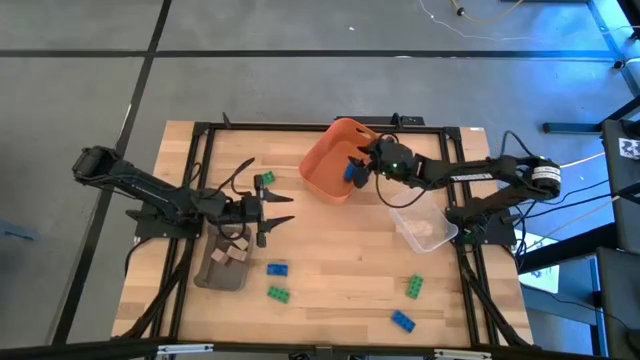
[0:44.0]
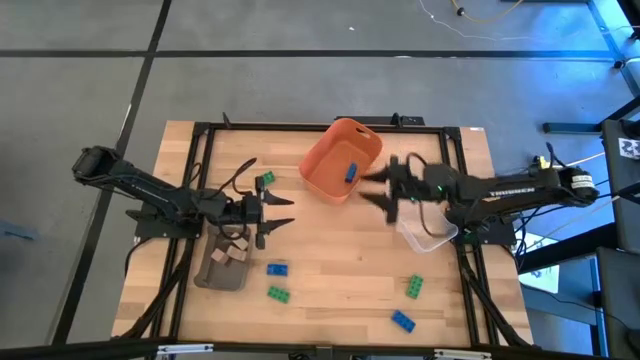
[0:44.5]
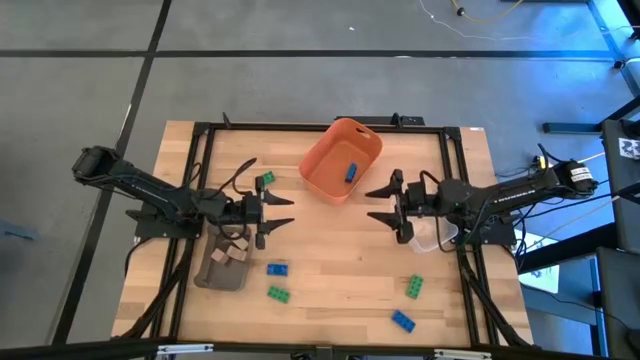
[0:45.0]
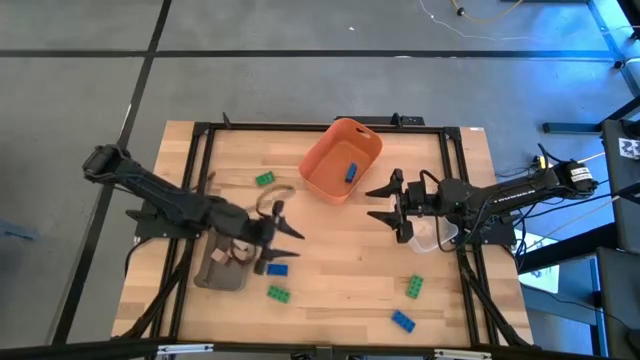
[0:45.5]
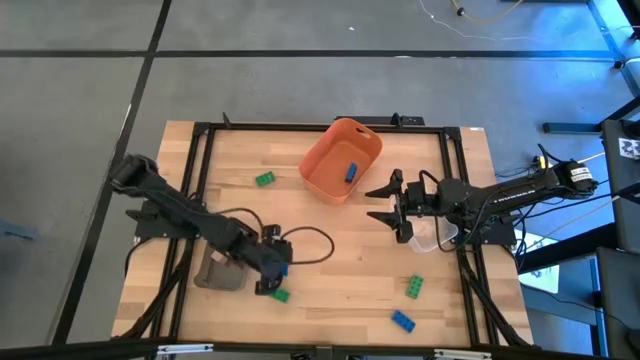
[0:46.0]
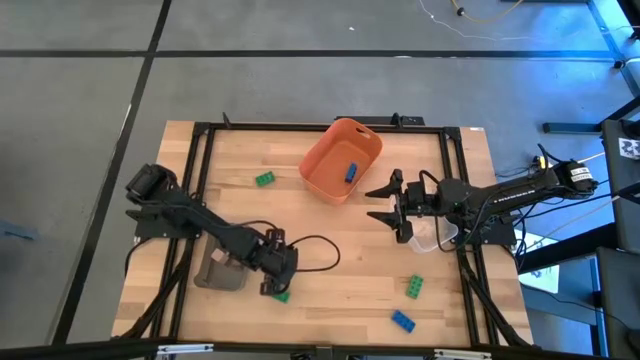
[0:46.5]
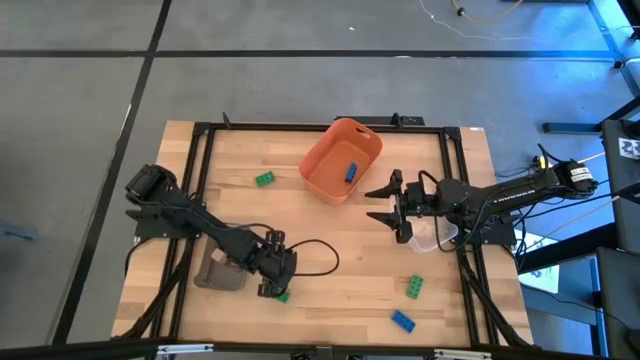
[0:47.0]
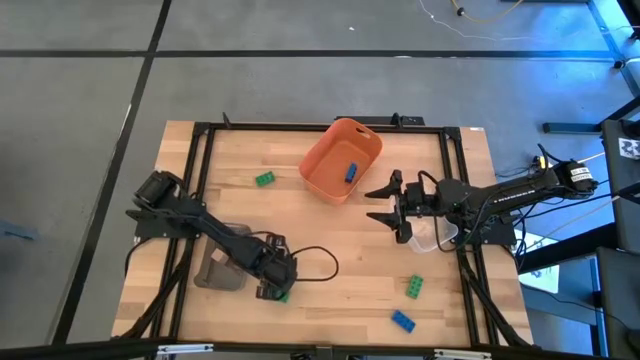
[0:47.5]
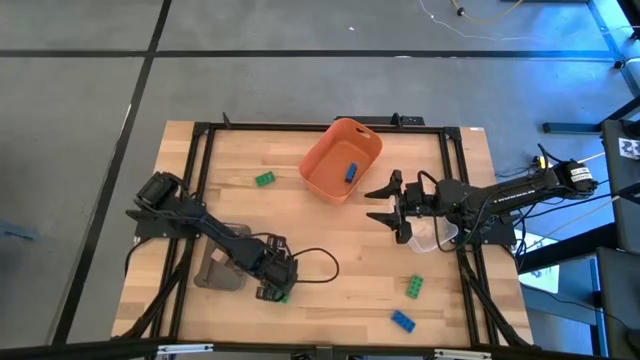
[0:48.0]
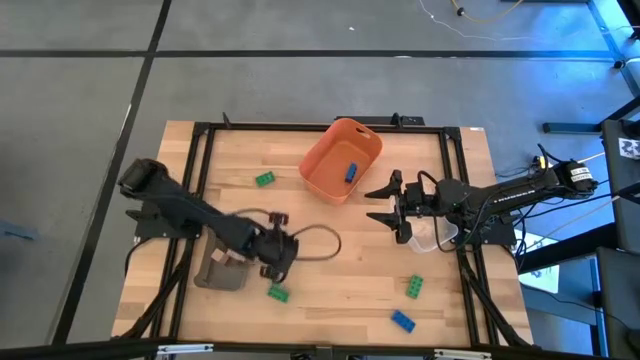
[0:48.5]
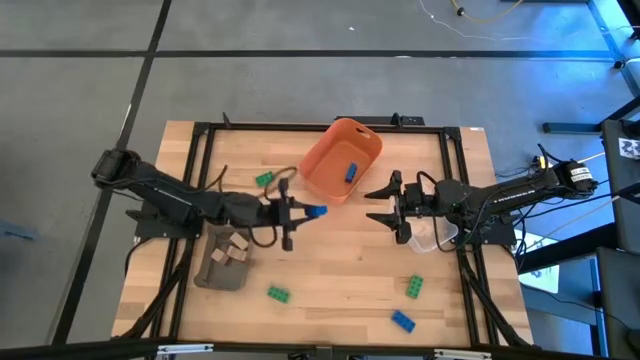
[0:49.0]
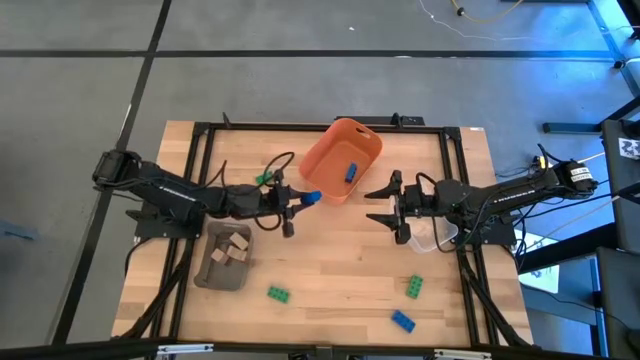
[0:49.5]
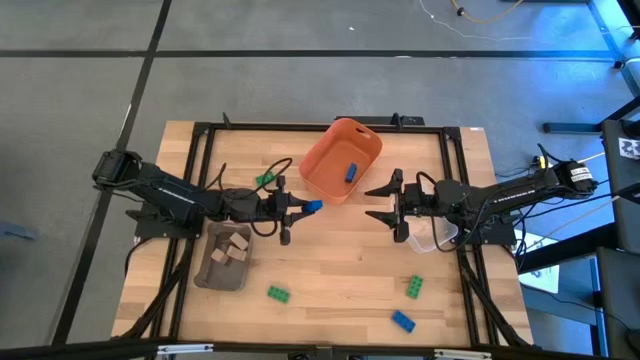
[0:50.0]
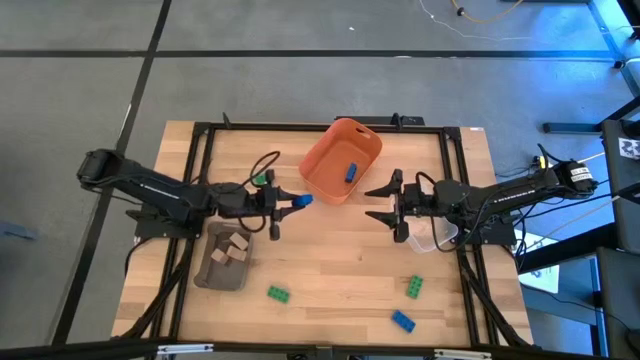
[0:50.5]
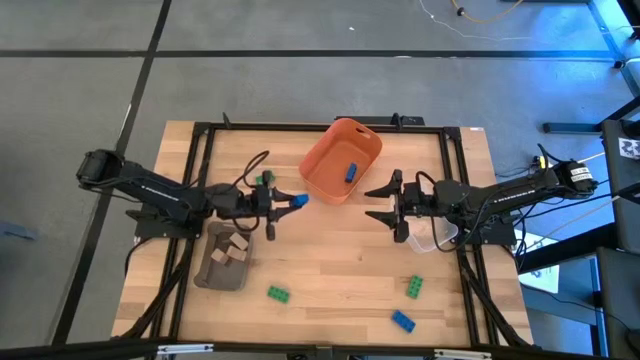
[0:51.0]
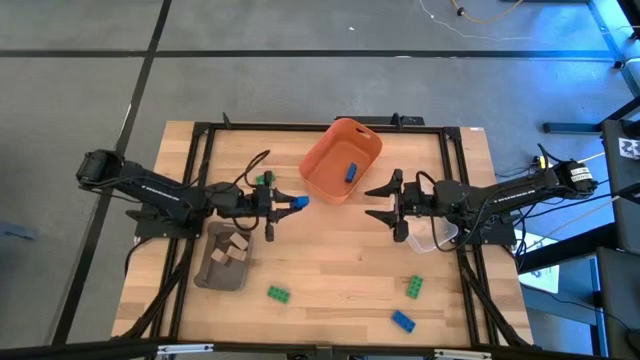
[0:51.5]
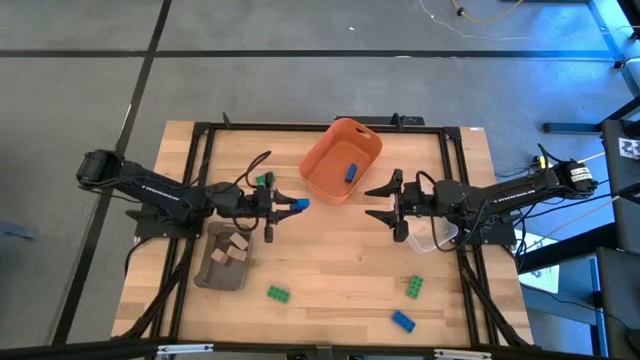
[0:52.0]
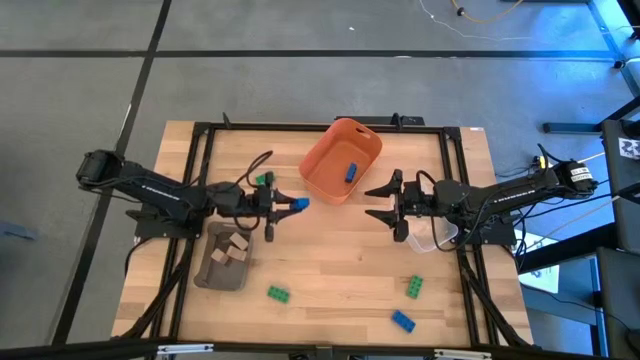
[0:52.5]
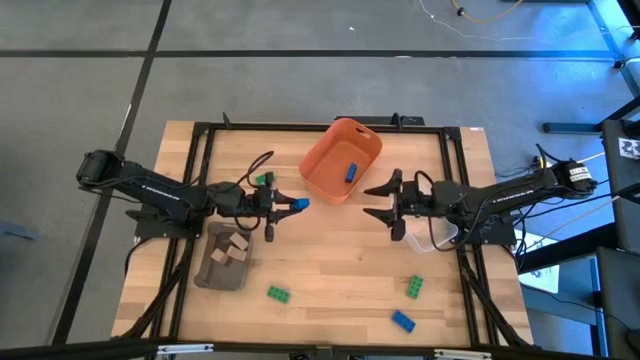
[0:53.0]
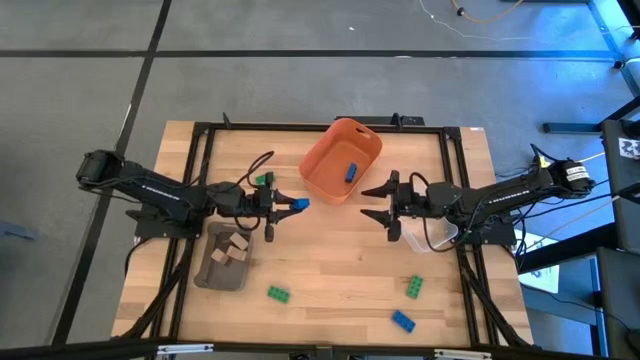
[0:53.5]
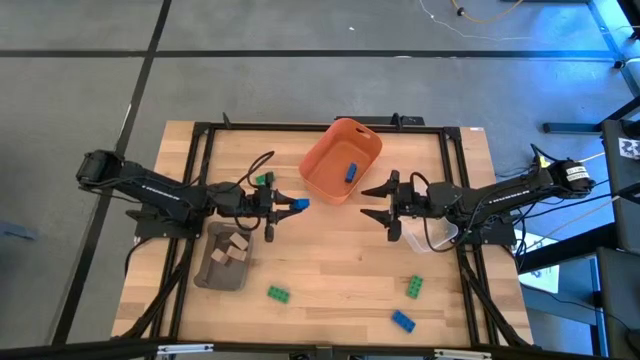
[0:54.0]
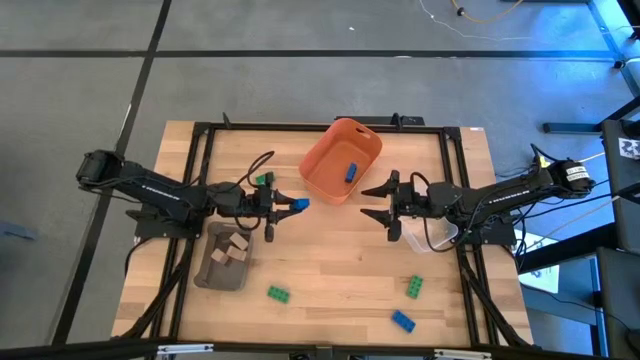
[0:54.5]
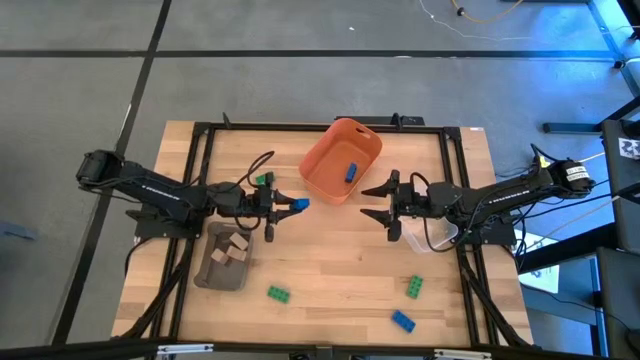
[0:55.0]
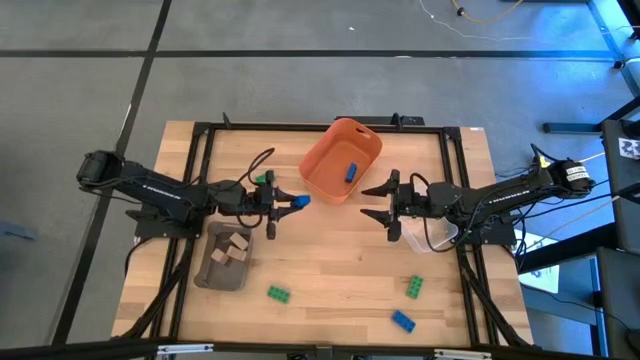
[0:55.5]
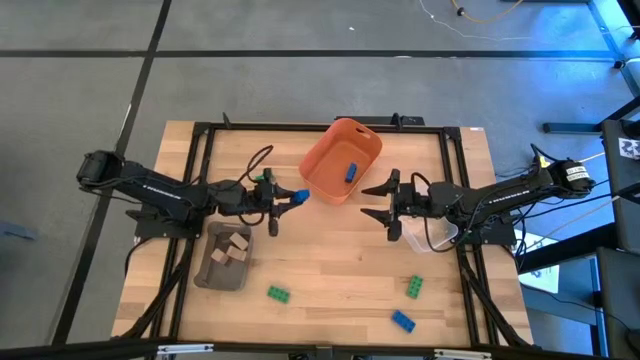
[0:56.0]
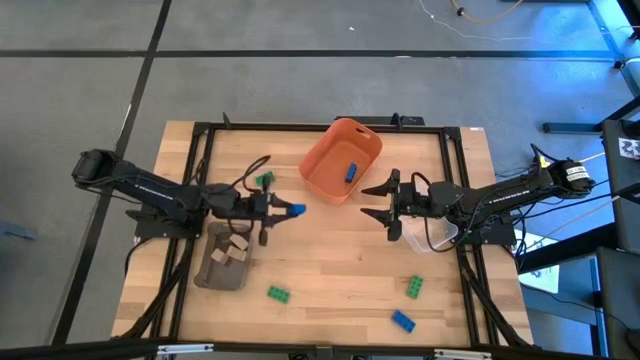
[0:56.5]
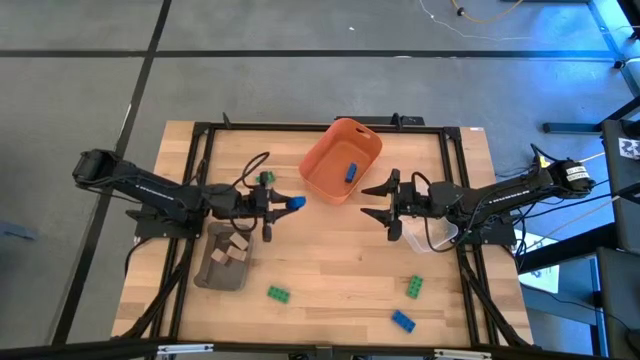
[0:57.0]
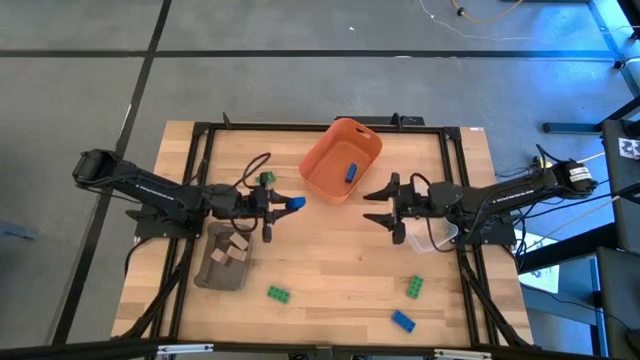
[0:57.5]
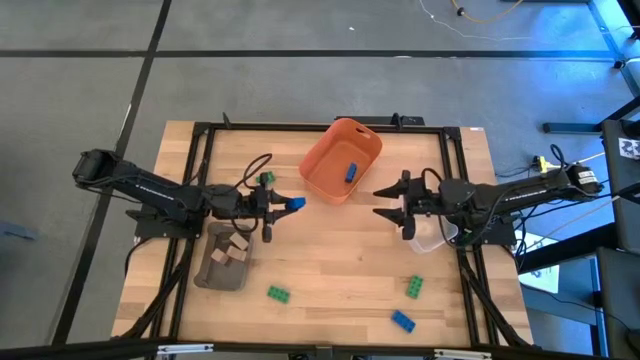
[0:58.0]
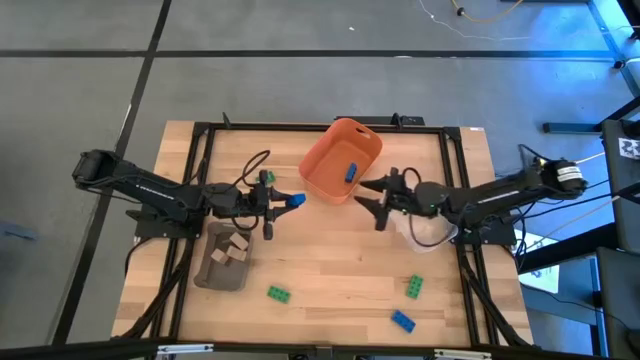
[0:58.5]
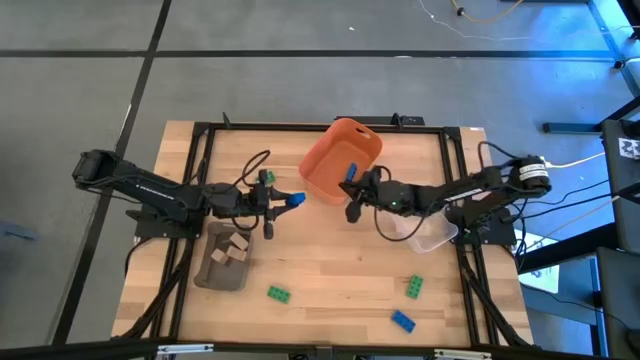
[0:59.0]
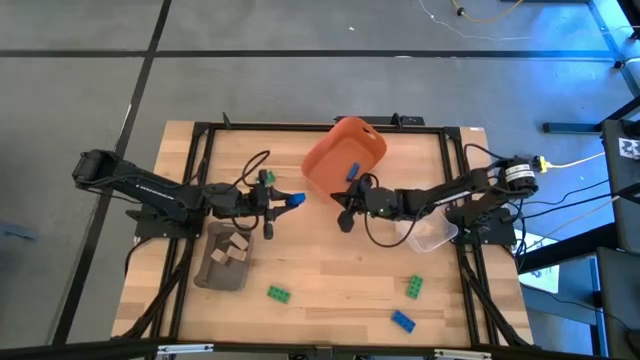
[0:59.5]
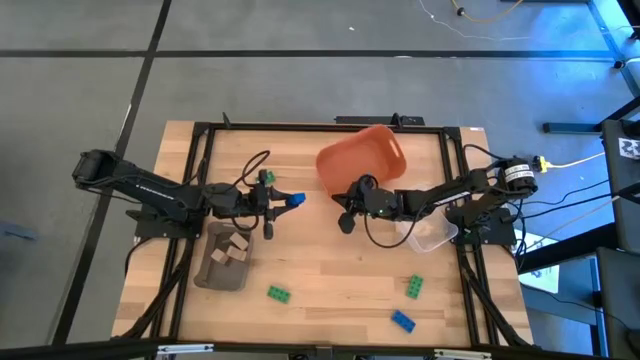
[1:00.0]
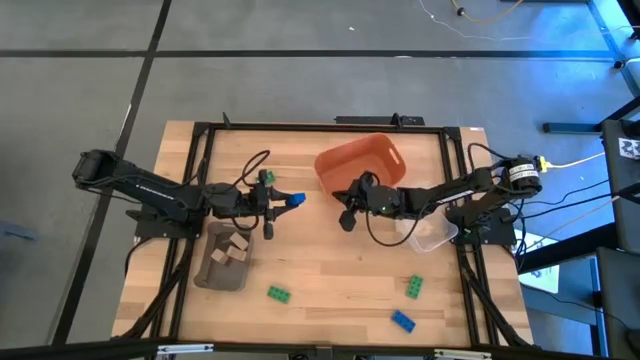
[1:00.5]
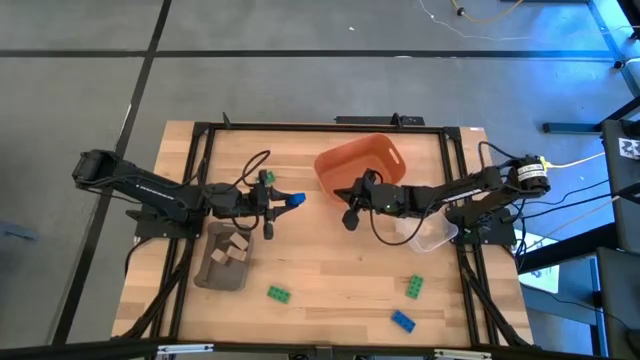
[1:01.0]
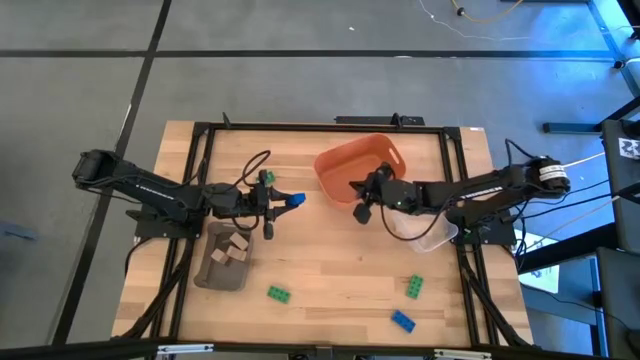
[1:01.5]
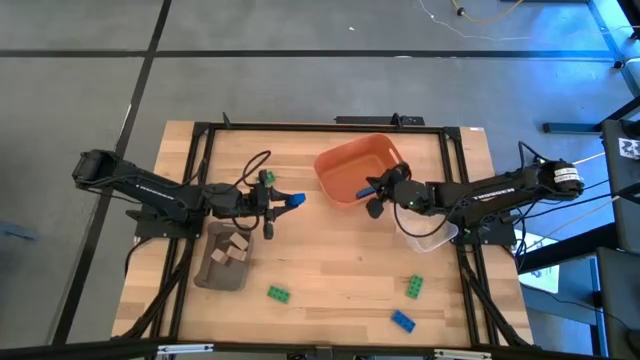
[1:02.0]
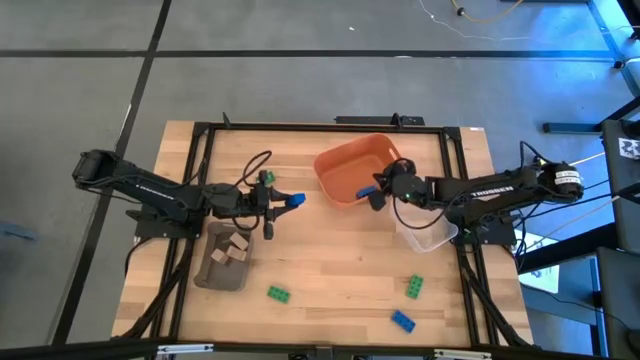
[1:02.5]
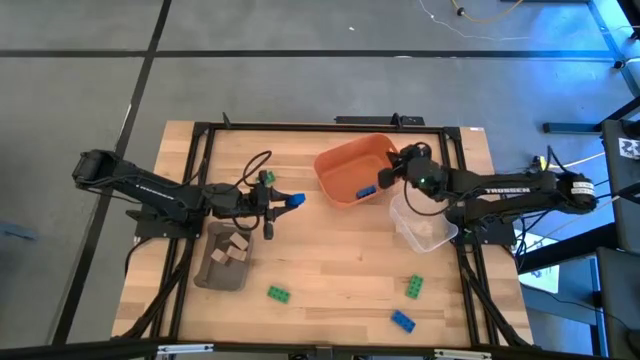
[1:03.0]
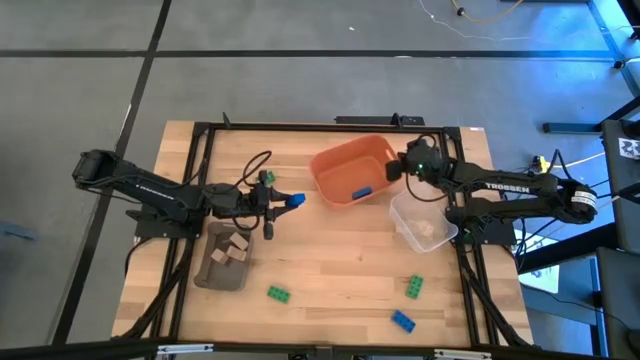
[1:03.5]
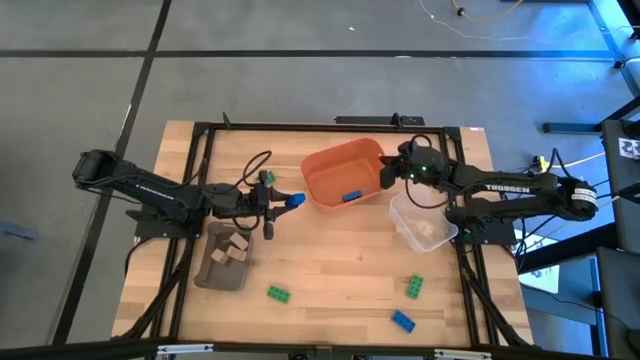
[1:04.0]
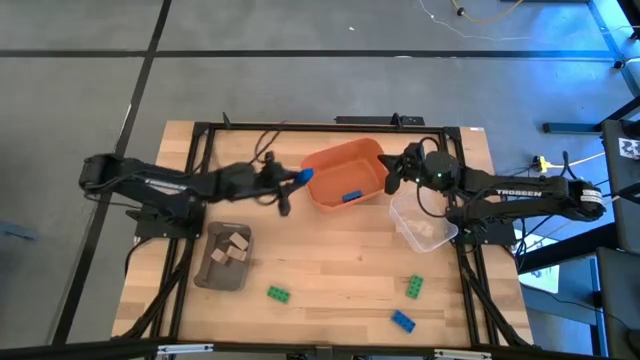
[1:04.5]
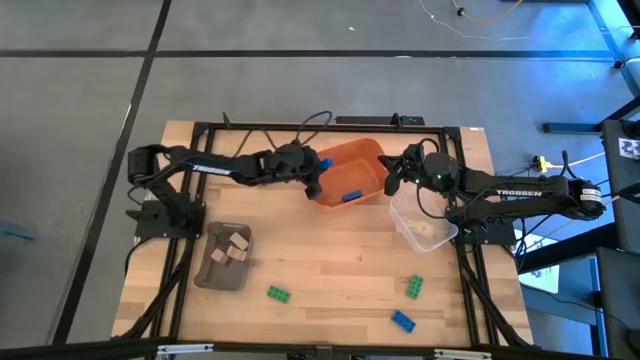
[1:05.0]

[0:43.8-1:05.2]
Task: Sort & place blocks by color
Put the left blue game piece into the orange bin

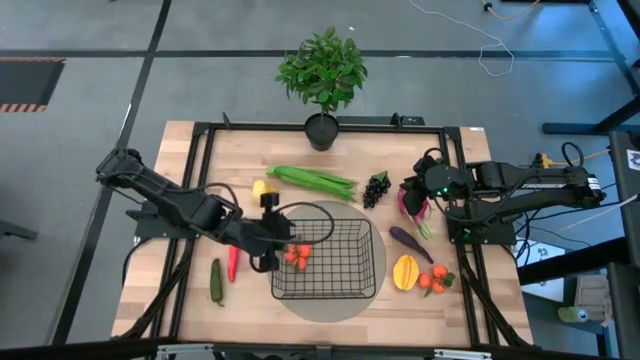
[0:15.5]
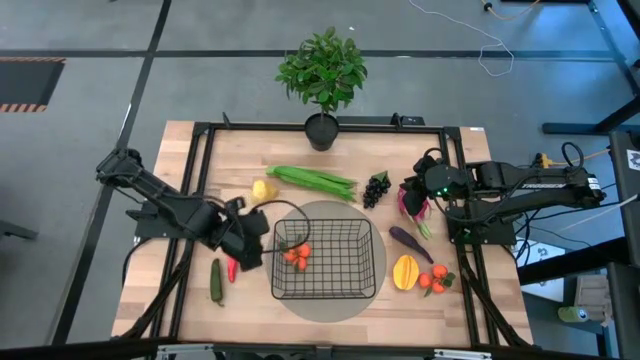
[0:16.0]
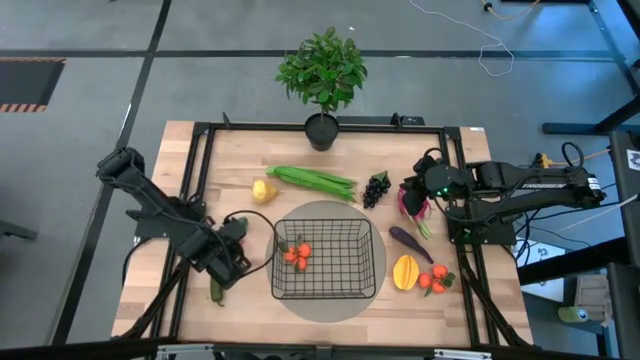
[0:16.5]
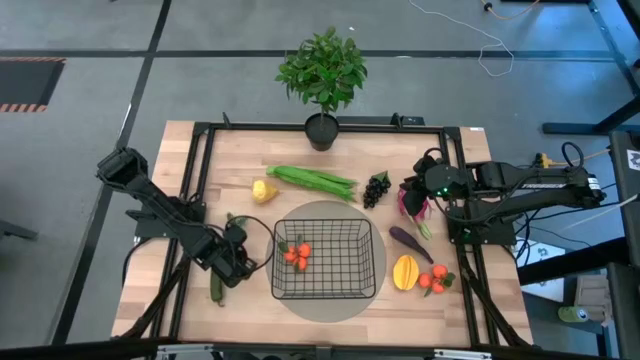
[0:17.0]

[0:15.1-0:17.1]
Task: Build produce basket
Put the carrot into the black wire basket
